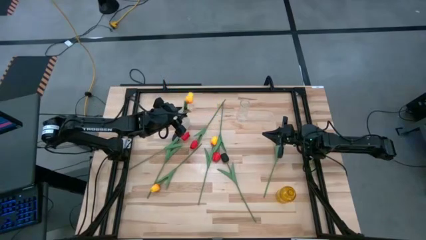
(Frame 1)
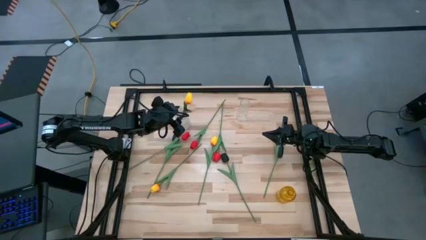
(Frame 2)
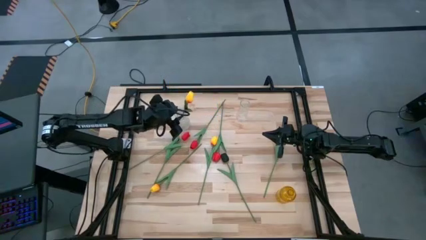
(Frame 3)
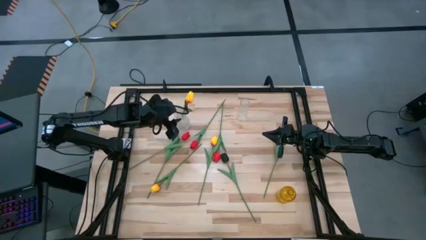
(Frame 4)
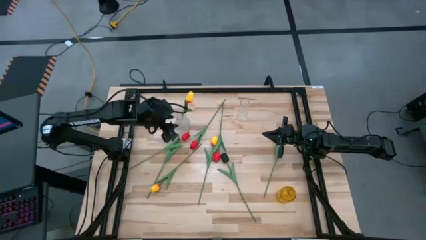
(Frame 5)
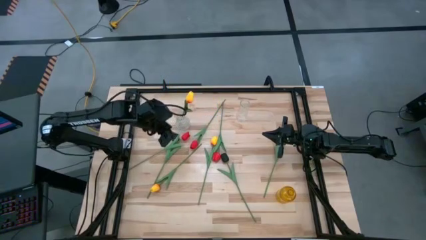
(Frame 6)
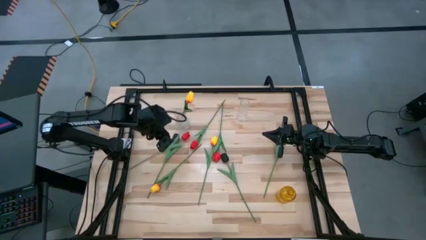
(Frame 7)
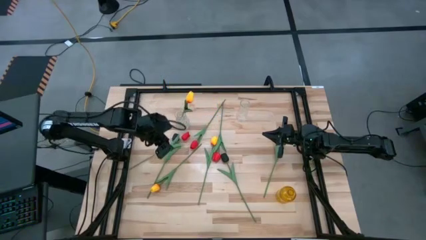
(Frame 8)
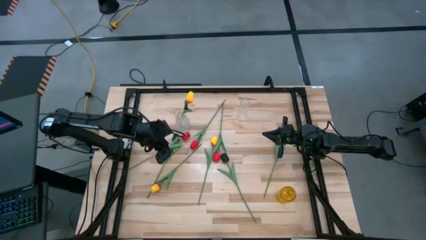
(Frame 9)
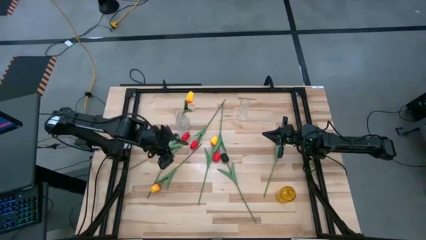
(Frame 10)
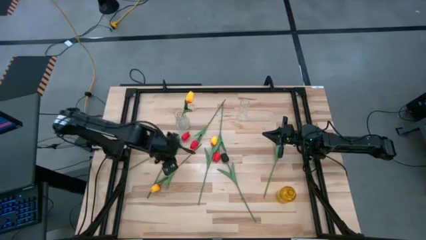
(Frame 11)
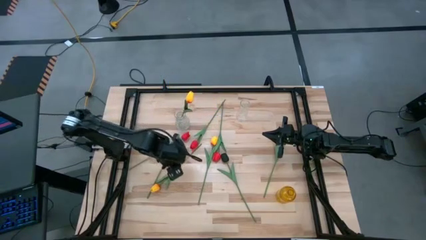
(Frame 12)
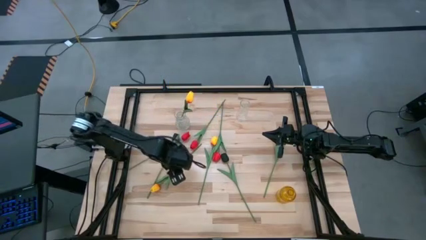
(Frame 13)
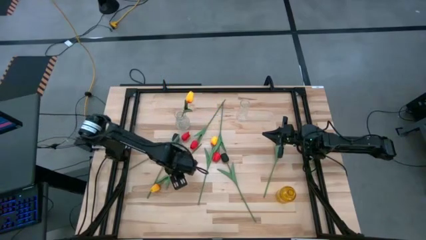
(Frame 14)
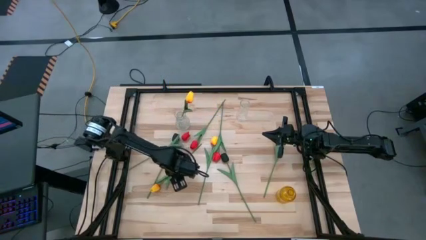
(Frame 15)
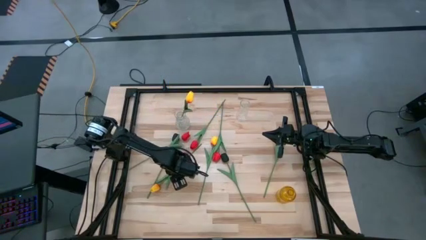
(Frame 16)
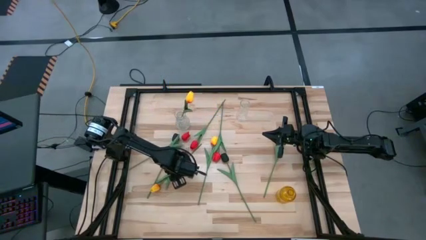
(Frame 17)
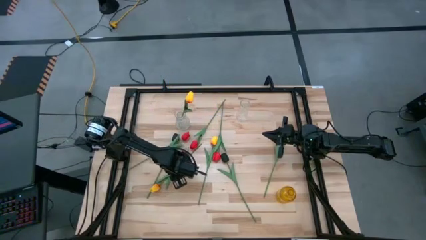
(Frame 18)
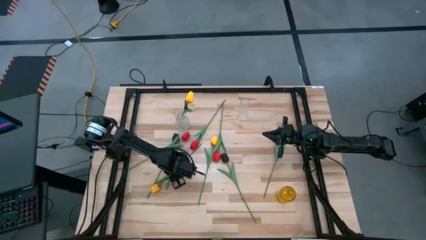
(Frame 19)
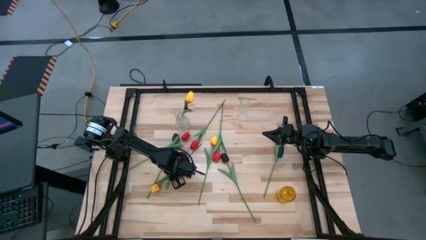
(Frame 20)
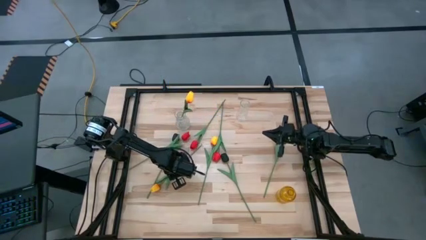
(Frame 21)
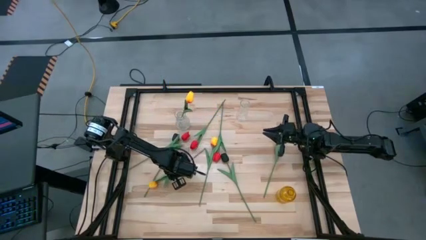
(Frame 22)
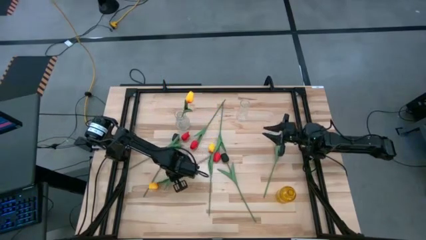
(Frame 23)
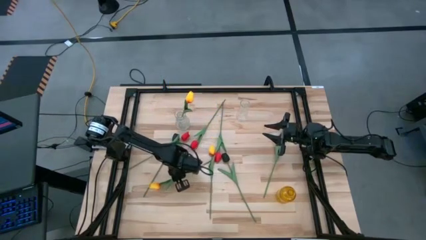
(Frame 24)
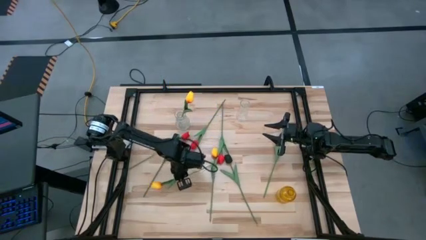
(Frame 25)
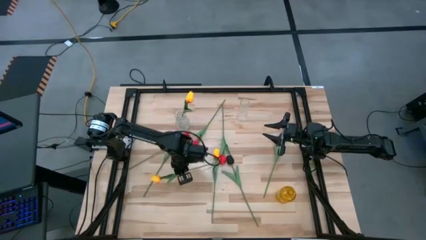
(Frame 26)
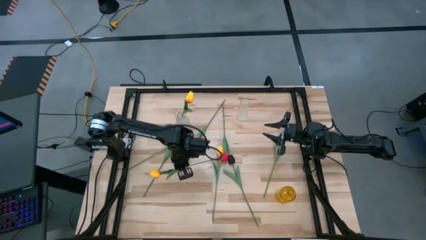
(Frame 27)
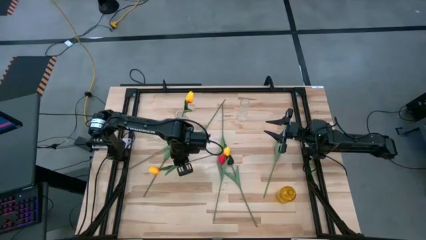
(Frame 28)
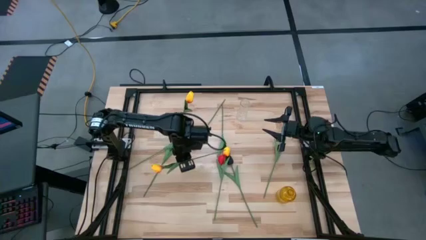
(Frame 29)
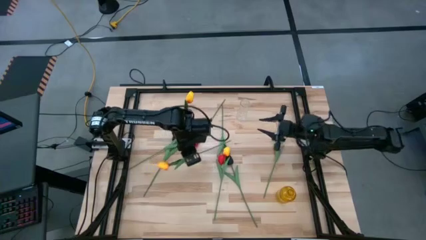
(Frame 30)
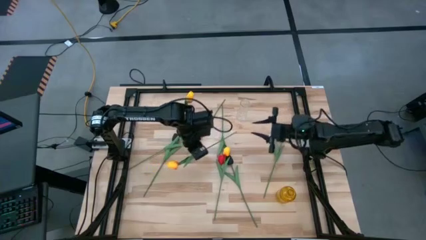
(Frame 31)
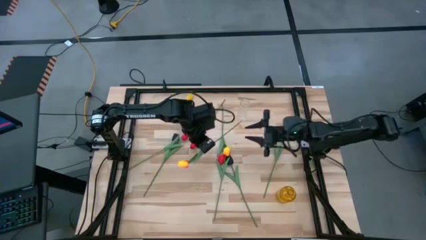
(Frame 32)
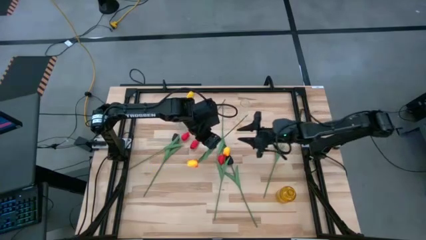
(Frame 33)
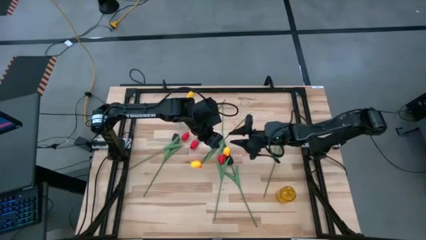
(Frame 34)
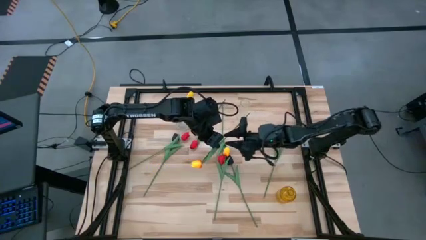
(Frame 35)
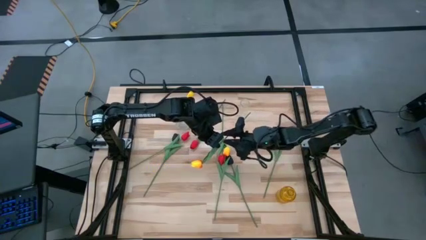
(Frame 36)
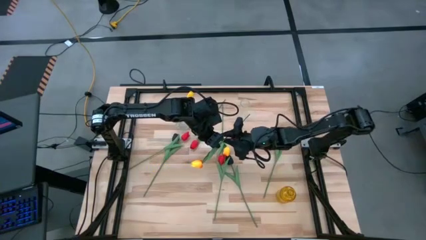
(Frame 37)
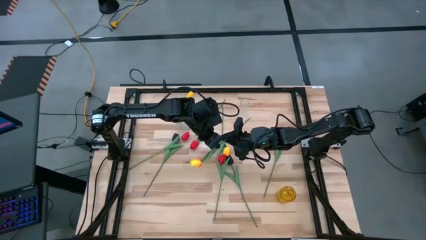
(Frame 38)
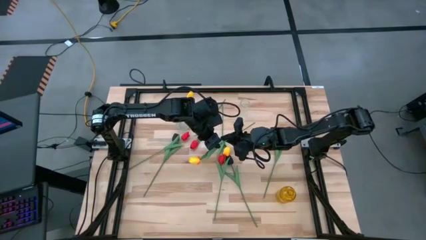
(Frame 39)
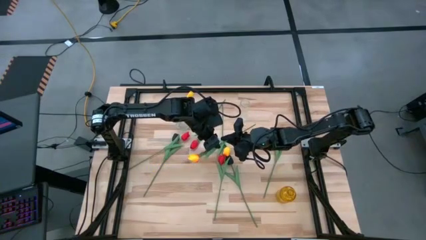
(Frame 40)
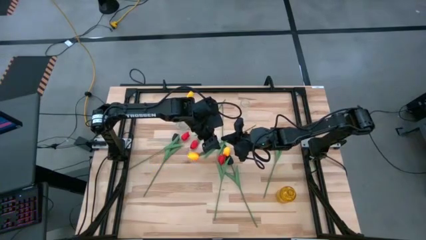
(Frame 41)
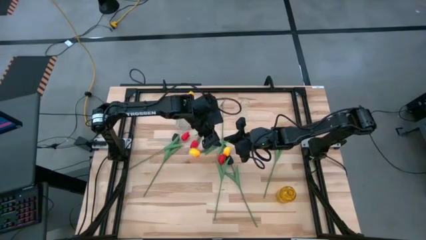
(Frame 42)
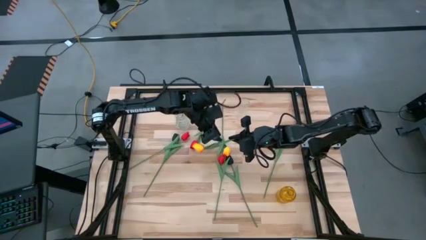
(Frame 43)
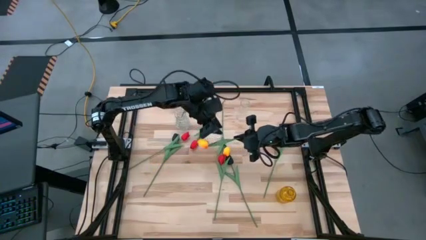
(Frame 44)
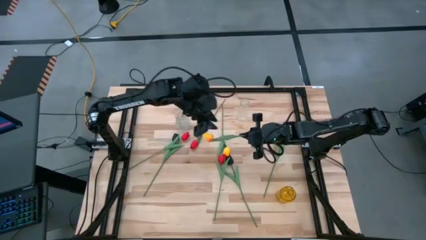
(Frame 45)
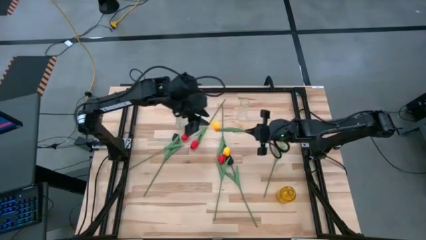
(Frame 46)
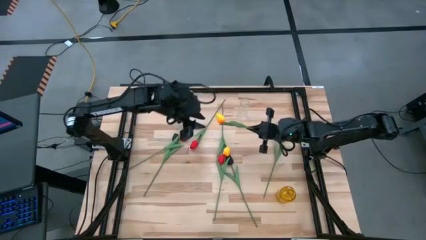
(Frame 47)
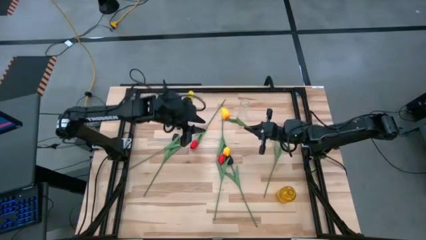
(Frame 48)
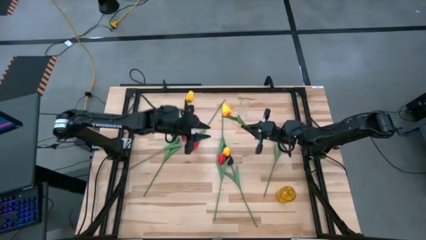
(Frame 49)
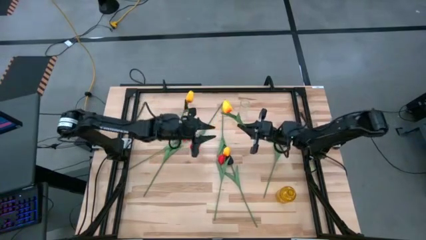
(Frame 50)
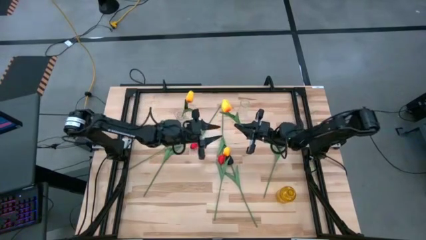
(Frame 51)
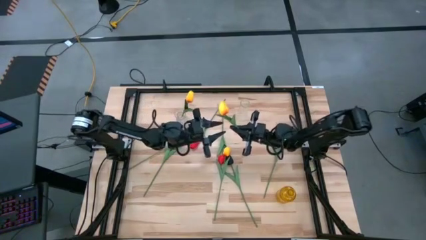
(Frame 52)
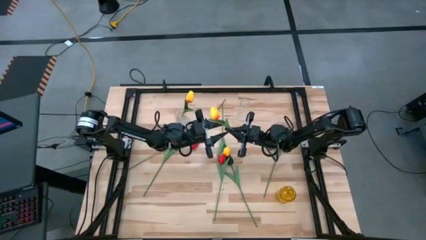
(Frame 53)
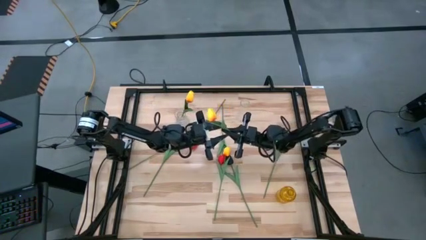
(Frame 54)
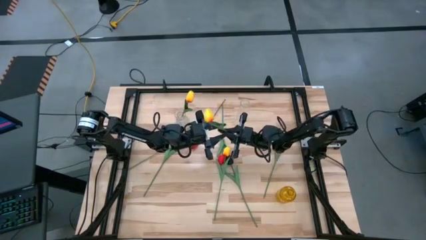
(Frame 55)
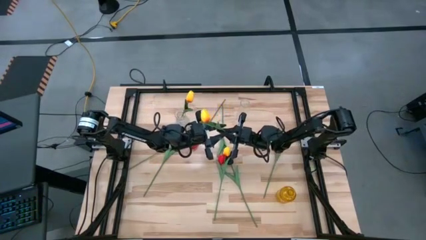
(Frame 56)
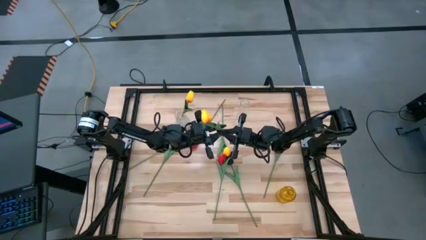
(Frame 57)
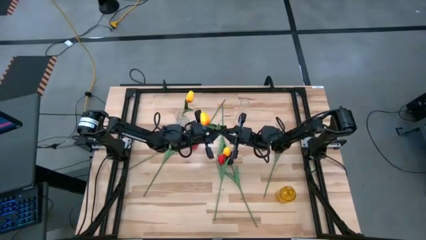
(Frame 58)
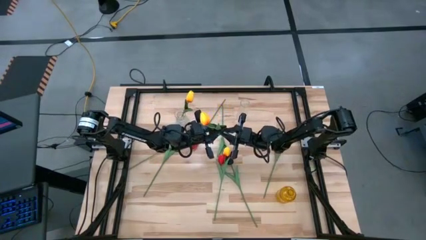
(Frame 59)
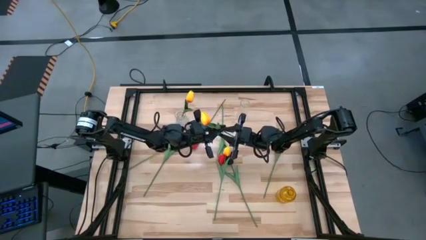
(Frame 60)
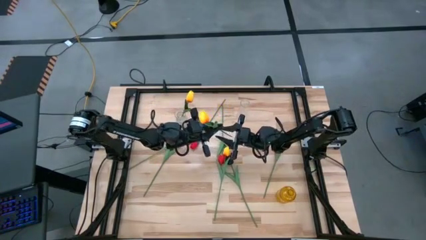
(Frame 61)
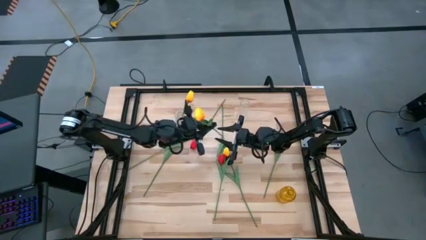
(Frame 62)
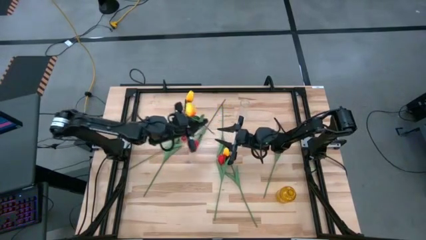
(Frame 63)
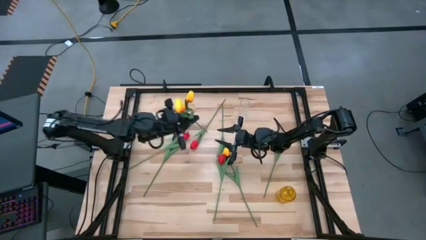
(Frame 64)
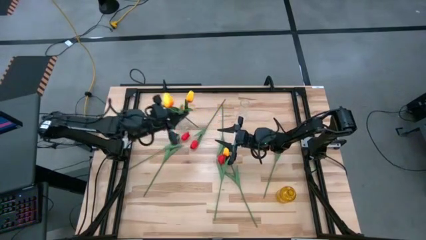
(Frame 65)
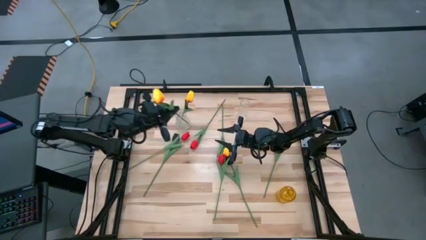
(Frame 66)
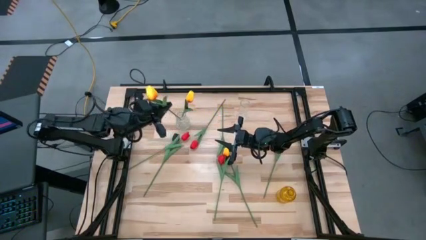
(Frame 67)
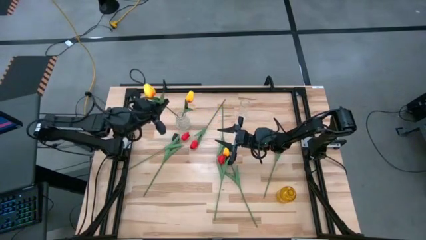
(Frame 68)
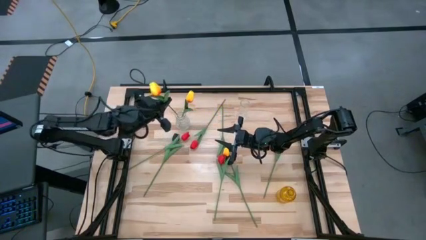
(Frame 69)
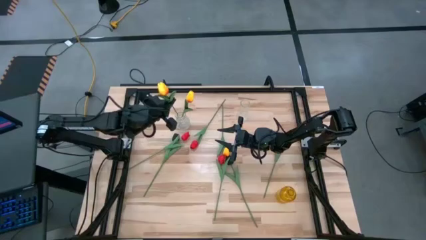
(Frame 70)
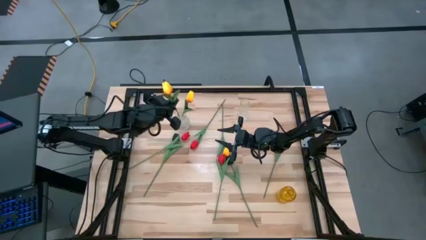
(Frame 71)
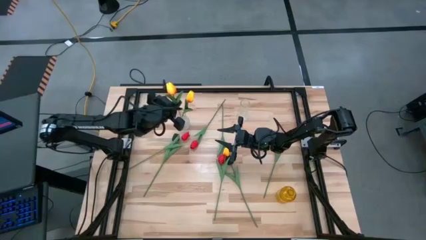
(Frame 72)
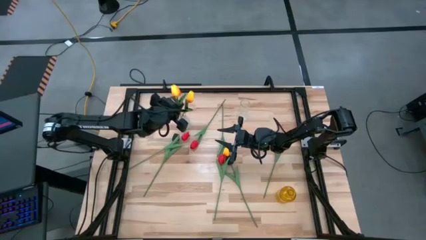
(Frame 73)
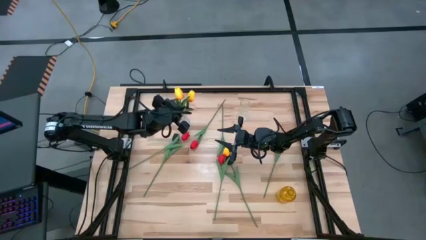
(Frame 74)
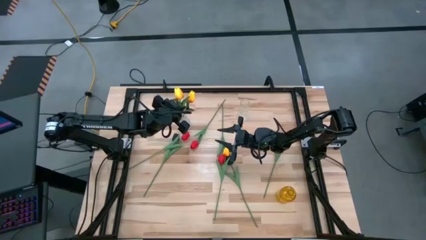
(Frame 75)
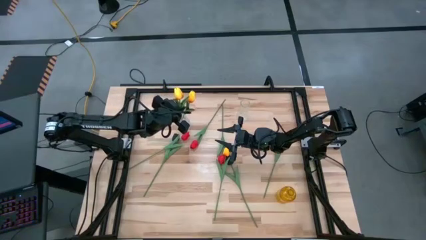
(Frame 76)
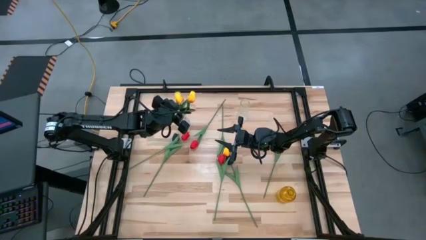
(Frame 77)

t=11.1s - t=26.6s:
Task: Sort flowers into vase by color
Put the bottom left yellow tulip into the left transparent vase
